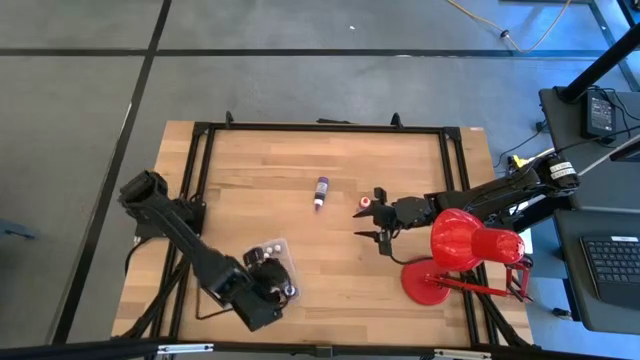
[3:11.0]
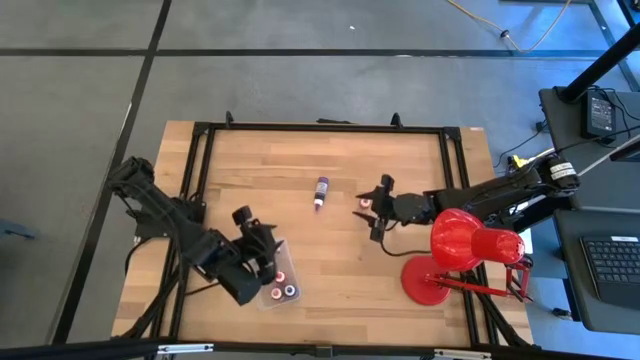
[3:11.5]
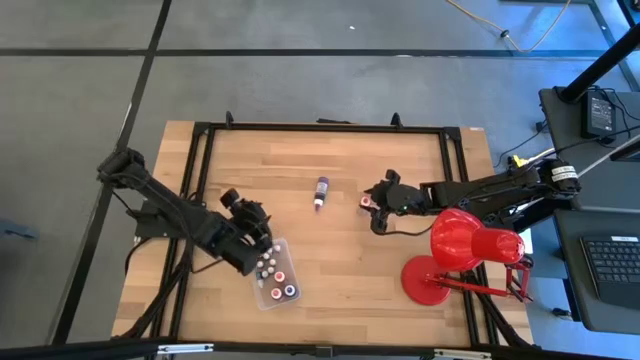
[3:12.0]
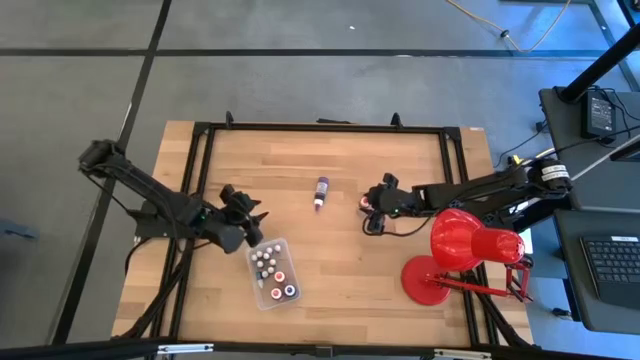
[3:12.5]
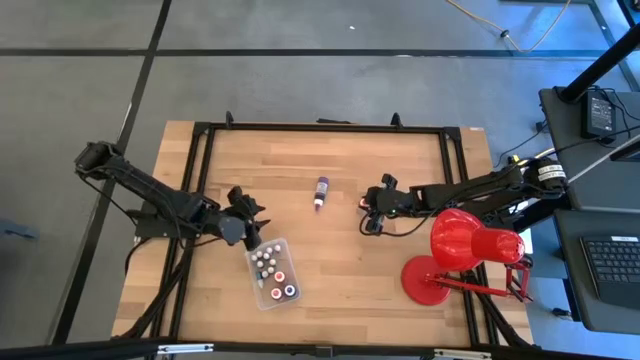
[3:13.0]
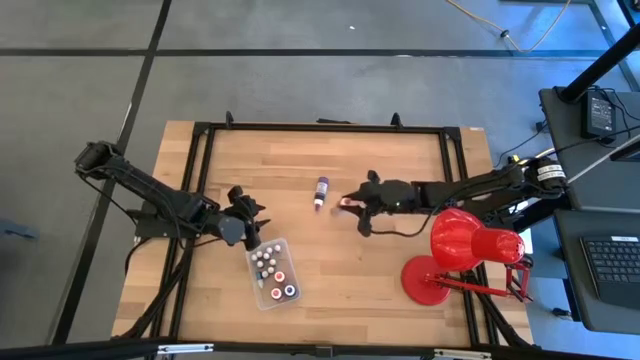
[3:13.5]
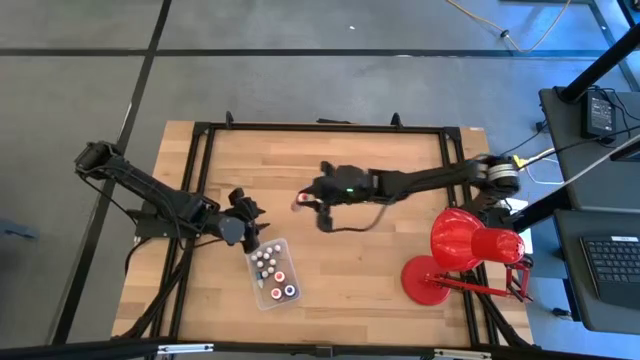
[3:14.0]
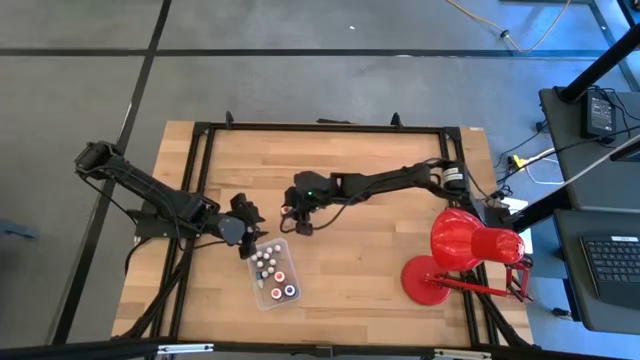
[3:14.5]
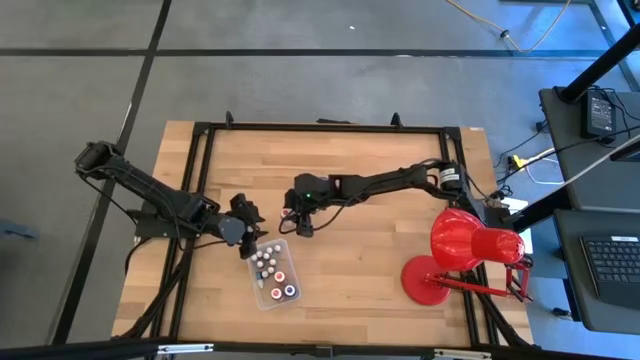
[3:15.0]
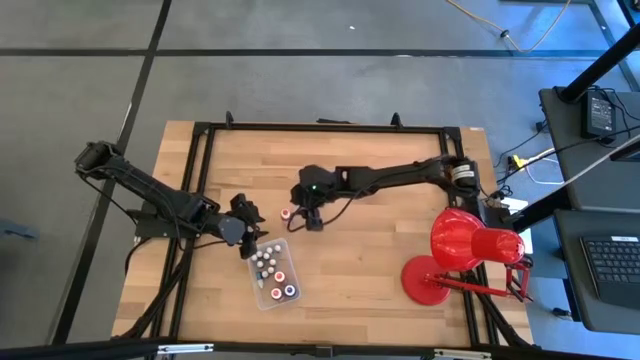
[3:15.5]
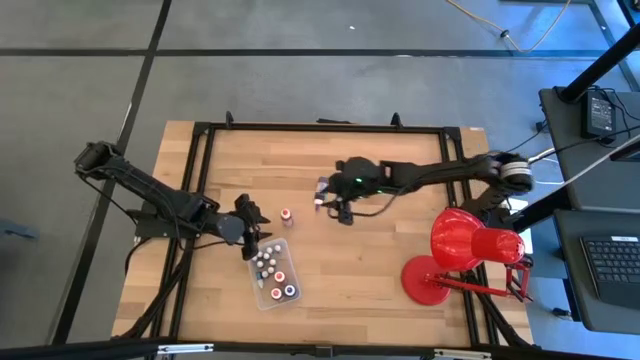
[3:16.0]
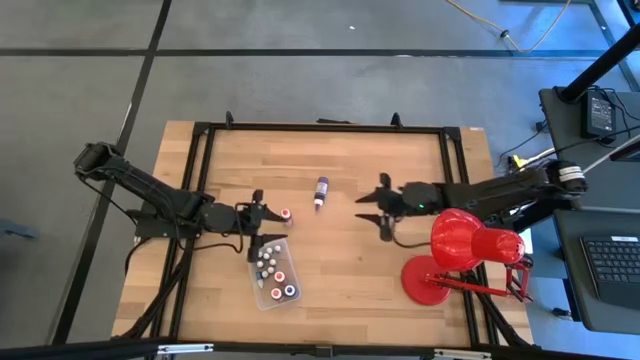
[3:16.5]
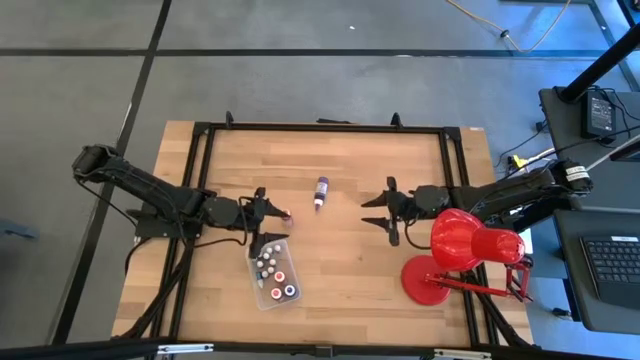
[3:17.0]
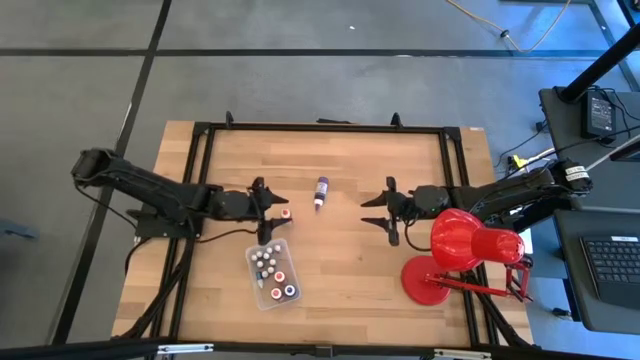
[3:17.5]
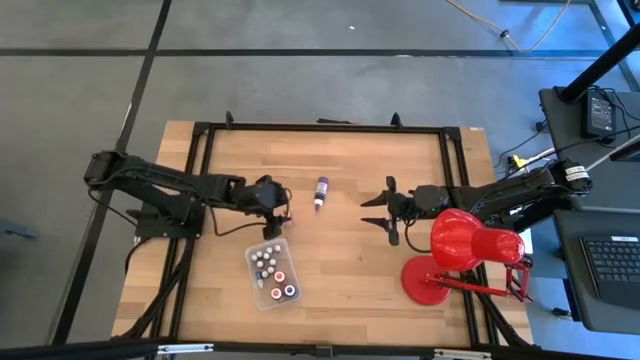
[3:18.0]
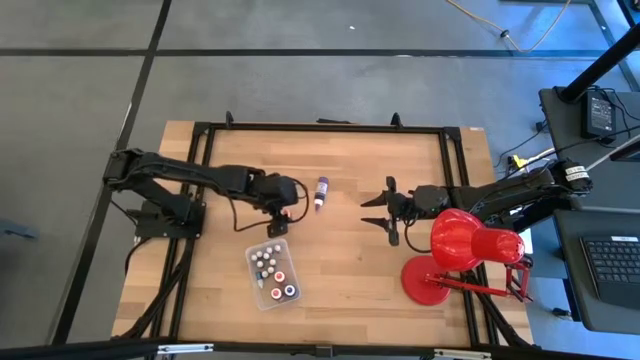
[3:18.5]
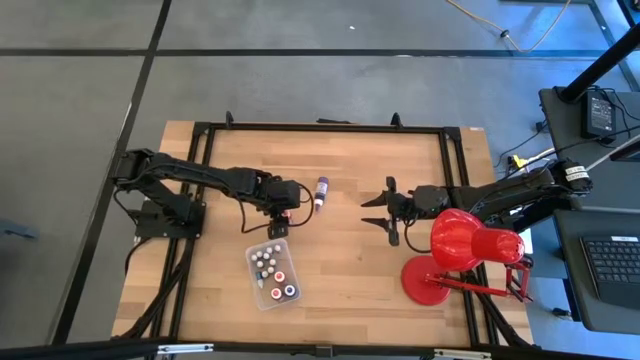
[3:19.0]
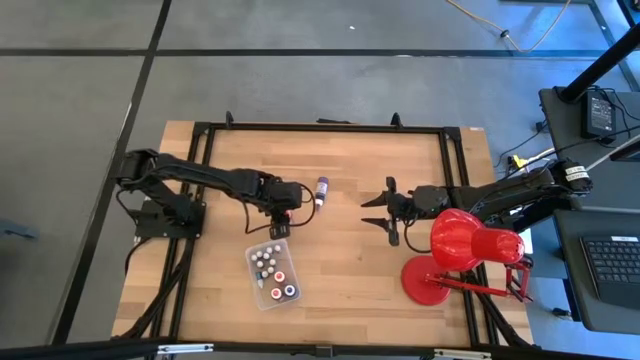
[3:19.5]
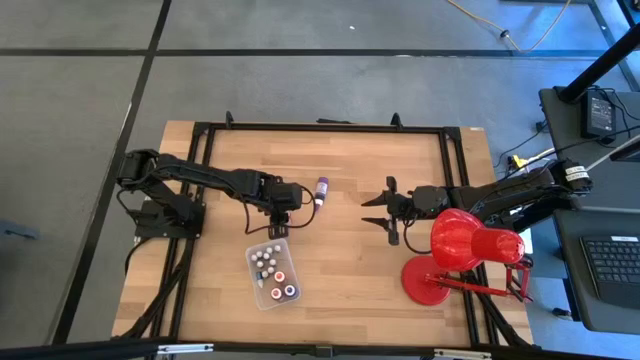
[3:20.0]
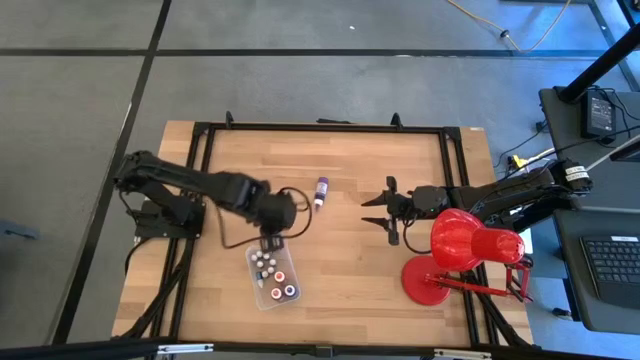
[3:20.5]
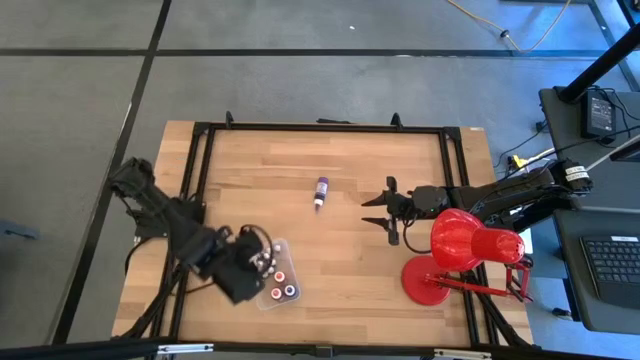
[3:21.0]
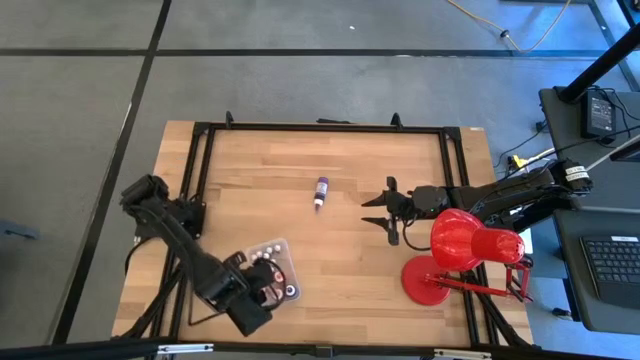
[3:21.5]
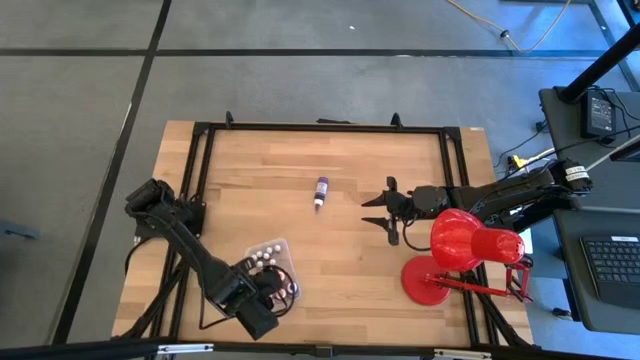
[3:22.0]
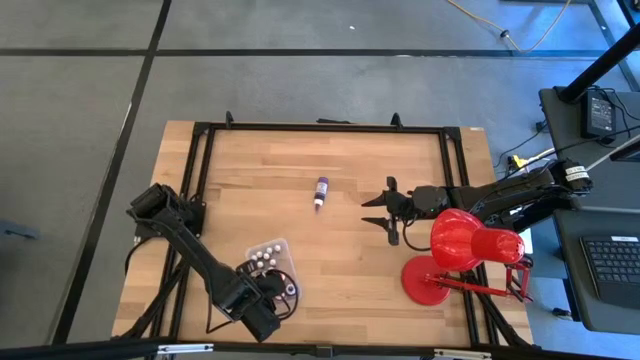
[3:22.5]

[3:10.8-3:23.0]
Task: Pick & Place food coloring
Put the large orange food coloring bottle into the bin

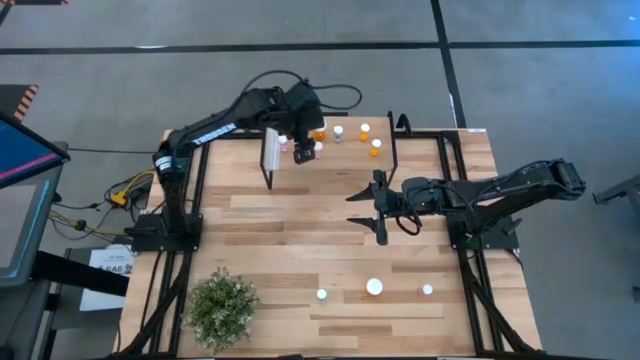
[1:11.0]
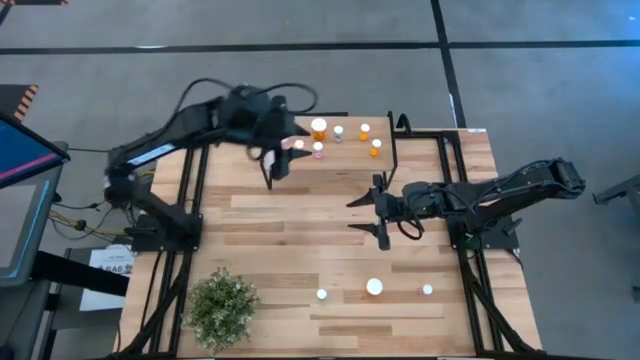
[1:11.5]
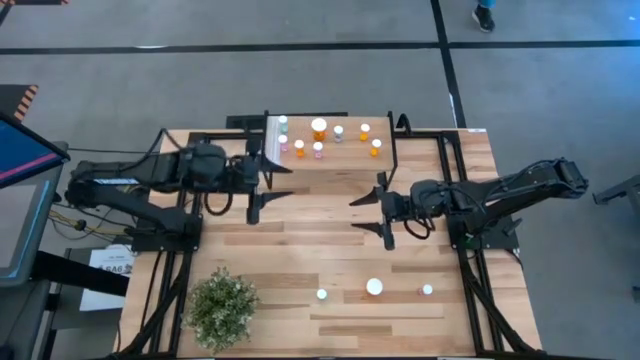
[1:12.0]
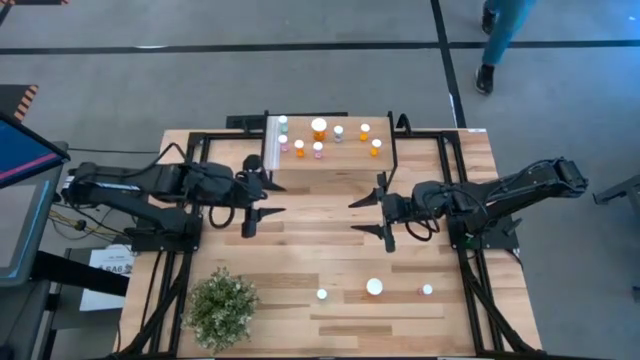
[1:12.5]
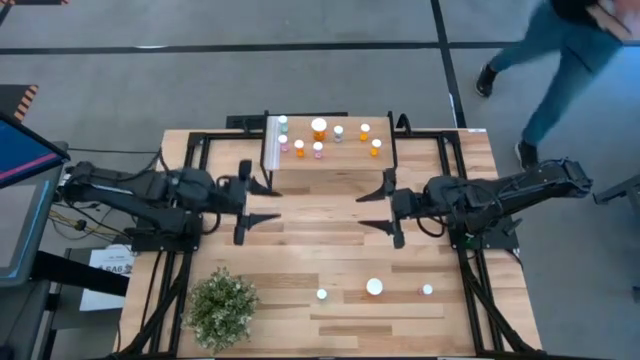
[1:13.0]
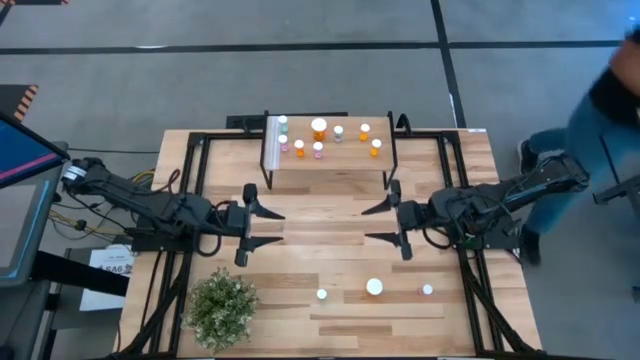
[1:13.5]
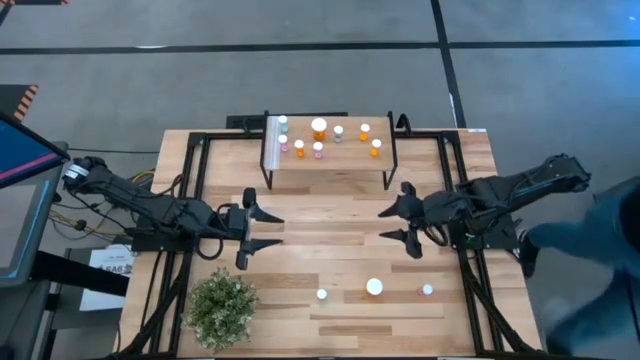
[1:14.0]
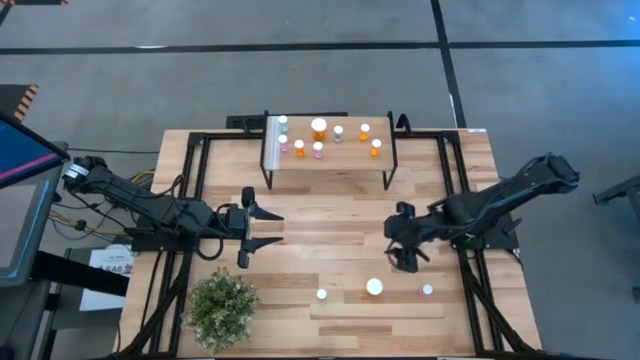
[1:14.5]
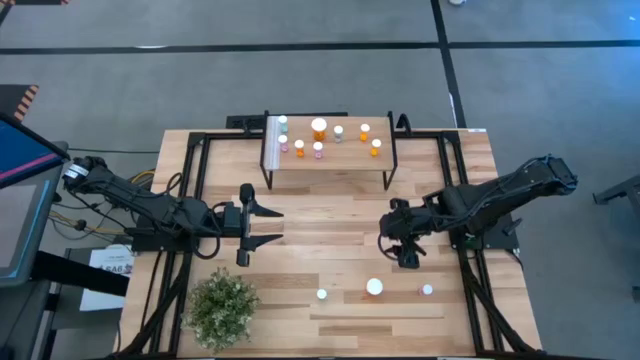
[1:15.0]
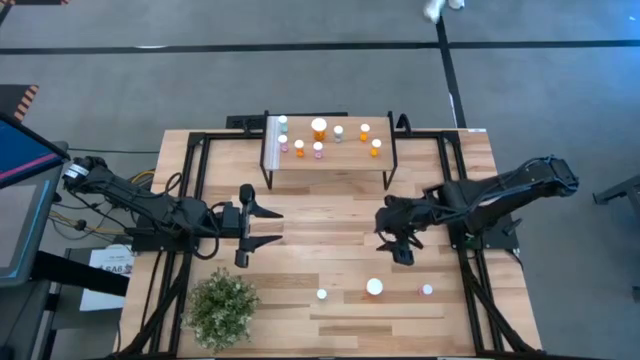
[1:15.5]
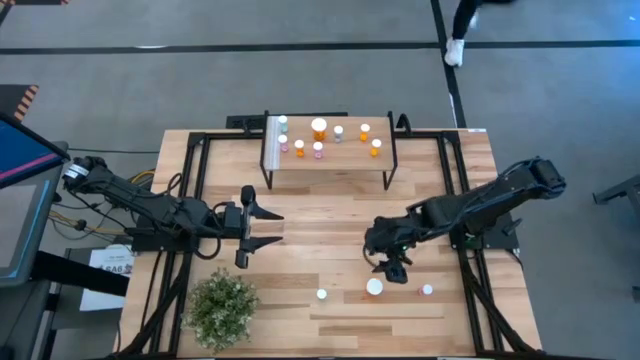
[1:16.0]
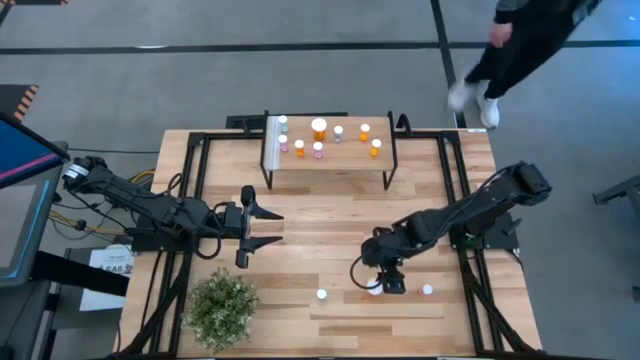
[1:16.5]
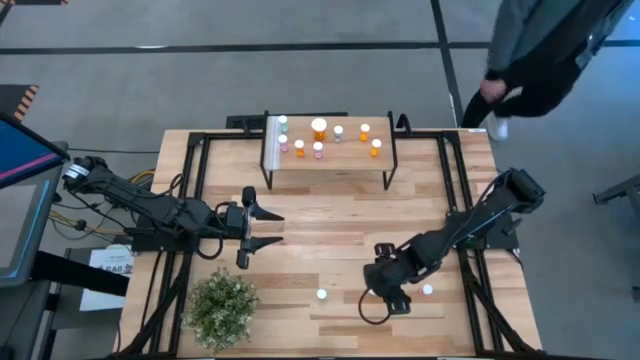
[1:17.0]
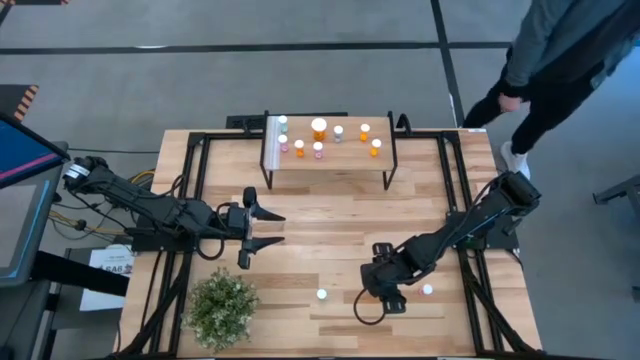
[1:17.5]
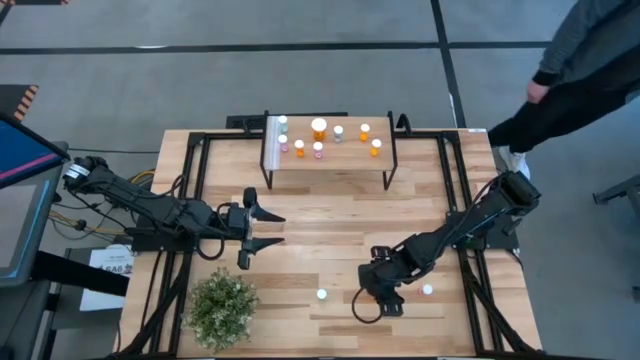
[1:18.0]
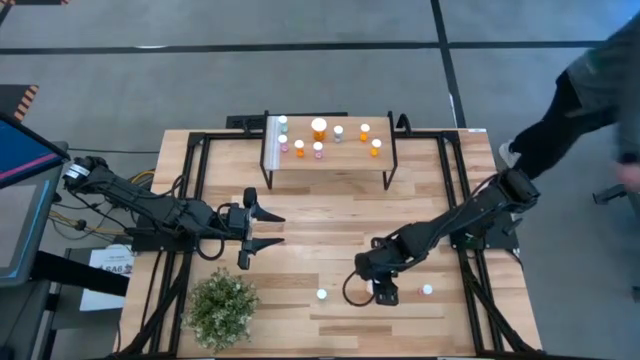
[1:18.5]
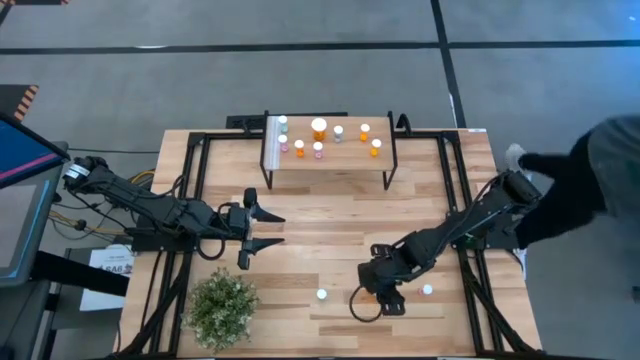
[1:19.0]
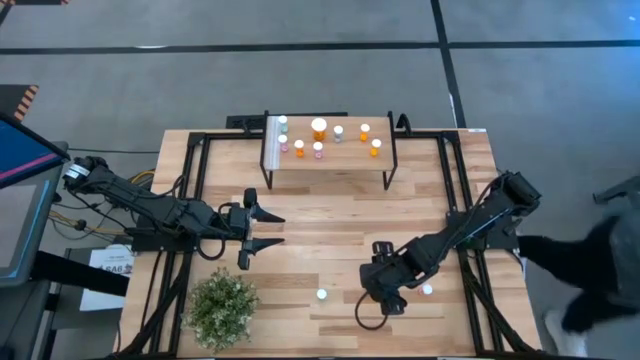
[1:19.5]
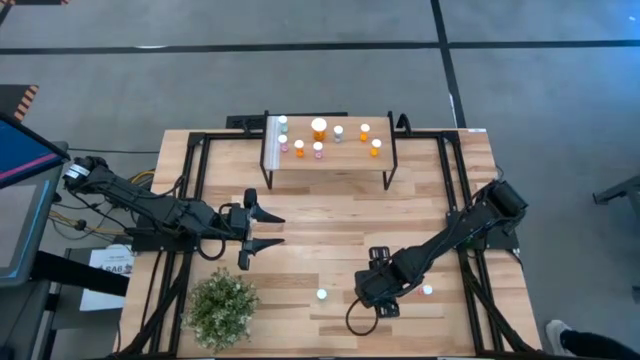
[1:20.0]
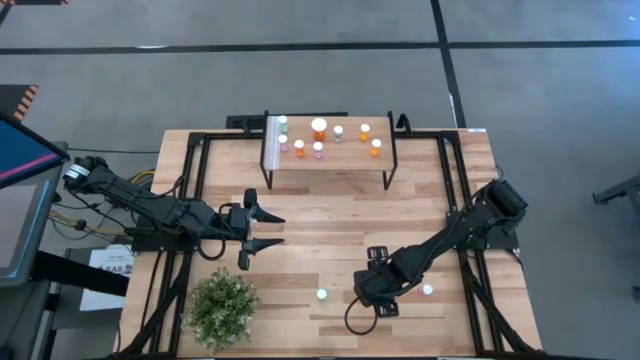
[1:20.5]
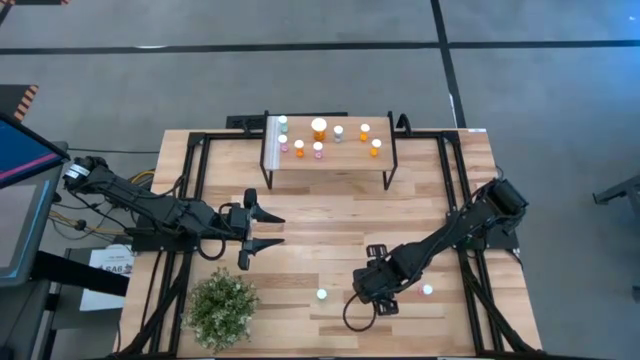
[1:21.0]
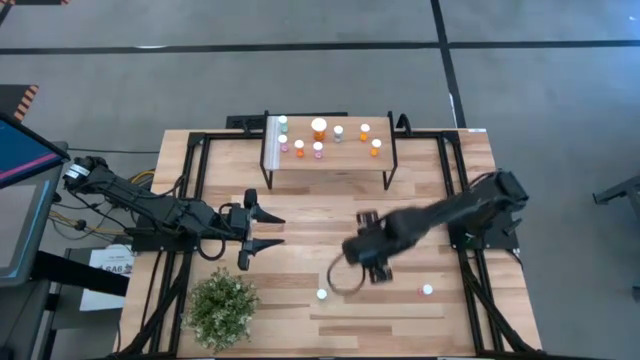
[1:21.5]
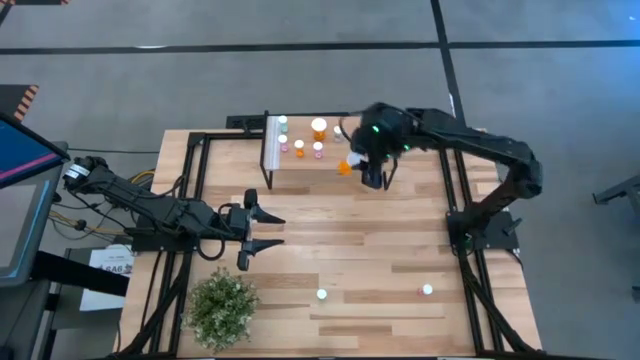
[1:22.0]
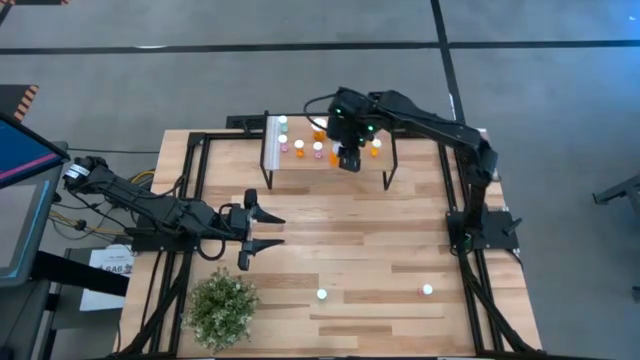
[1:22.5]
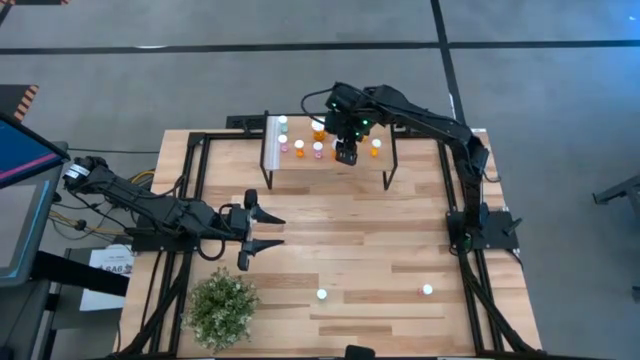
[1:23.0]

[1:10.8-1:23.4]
Task: Pick and place medicine bottles onto shelf by color
Put the large orange pill bottle on the shelf
